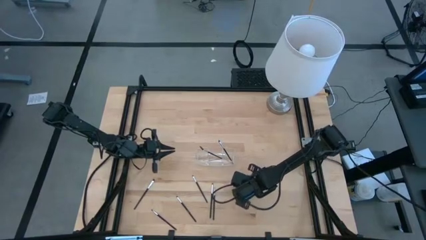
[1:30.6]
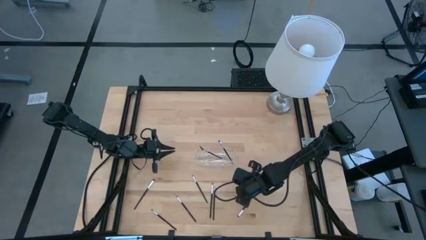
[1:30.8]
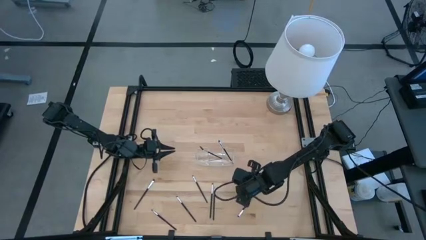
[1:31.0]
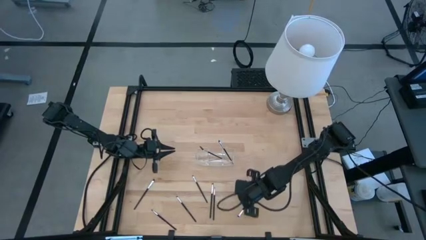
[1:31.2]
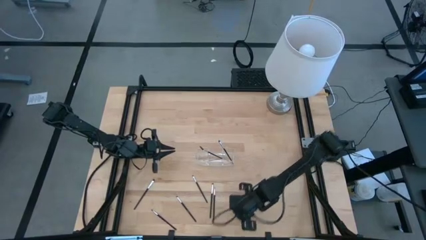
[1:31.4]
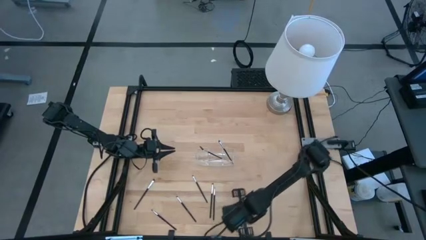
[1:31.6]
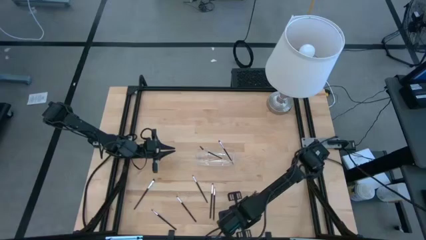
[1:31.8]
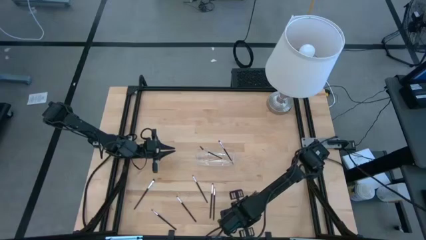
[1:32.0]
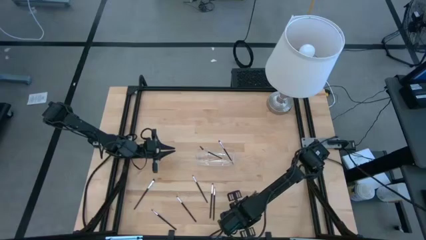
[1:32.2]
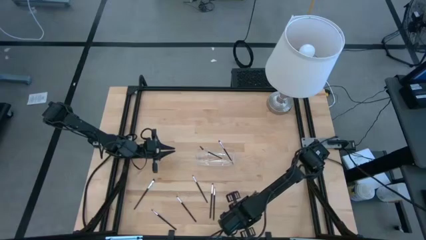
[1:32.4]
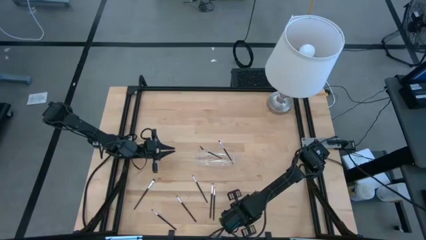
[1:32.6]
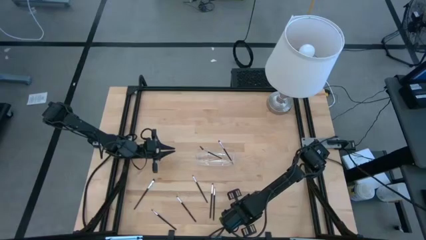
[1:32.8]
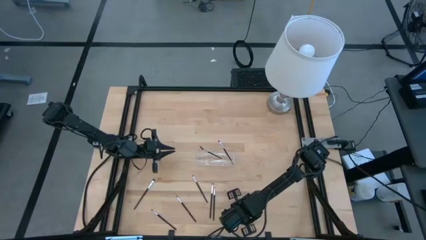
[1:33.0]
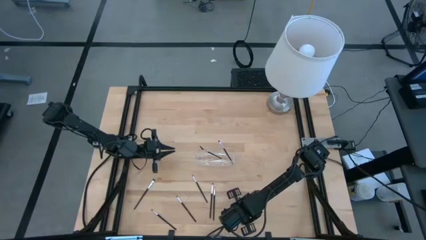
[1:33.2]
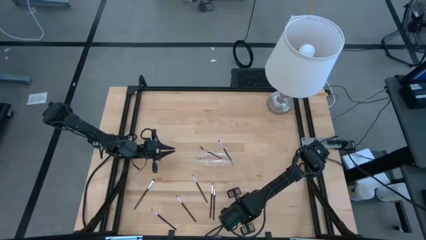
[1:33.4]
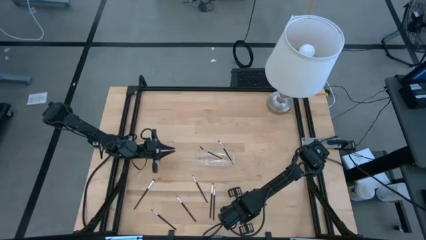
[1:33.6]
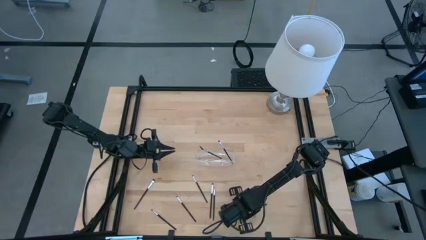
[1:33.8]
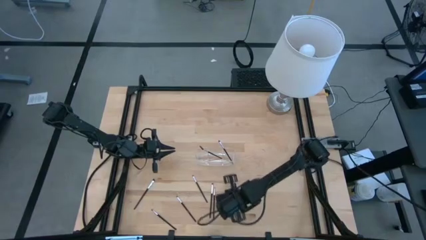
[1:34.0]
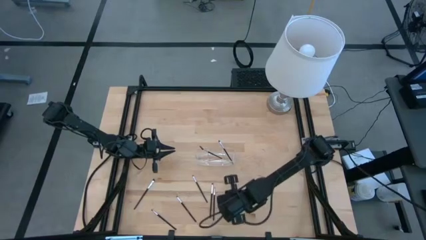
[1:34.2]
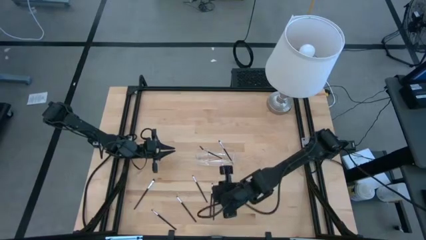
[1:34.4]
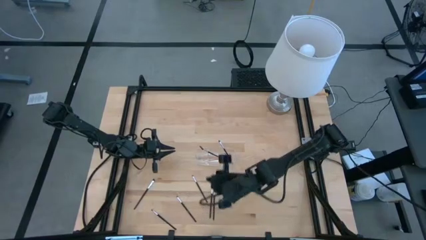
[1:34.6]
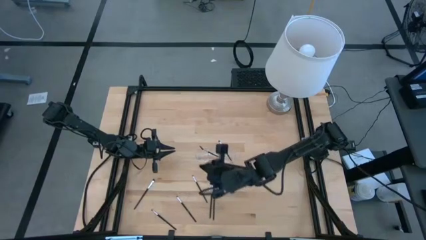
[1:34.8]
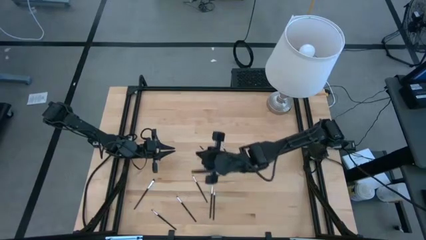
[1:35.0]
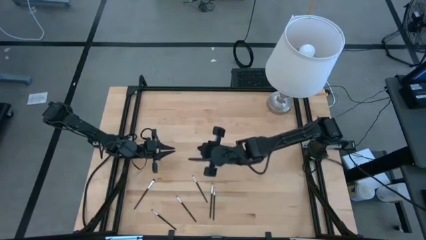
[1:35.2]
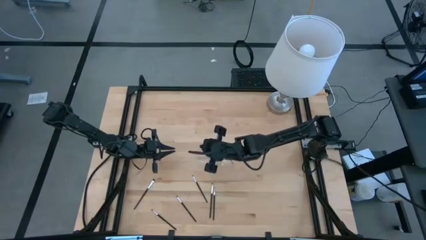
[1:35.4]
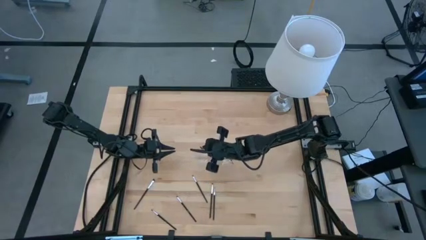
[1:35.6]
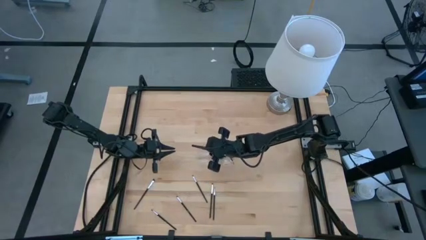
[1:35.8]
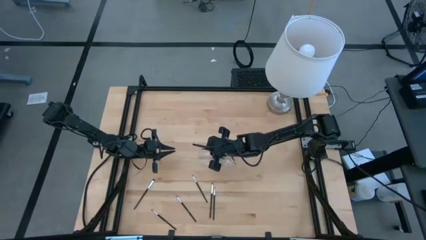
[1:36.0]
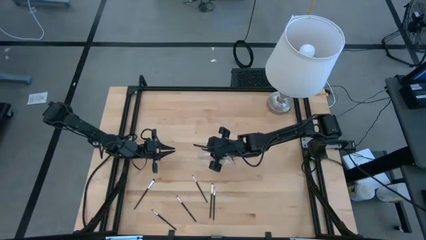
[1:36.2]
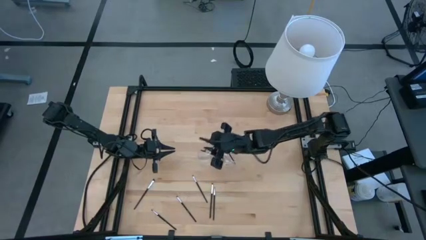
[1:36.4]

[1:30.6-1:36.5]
Task: Pick & Place Makeup Supplies
Put the makeup brush into the transparent organizer

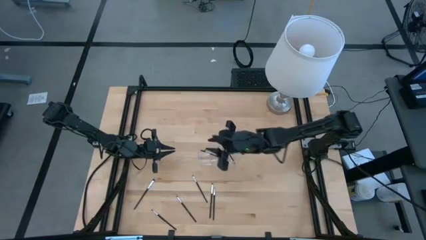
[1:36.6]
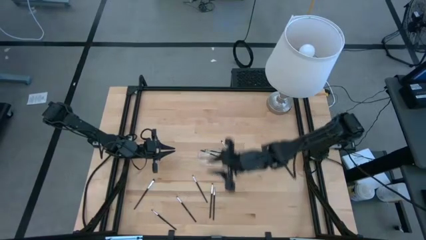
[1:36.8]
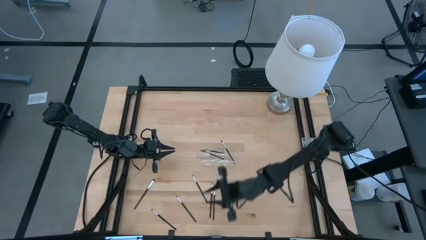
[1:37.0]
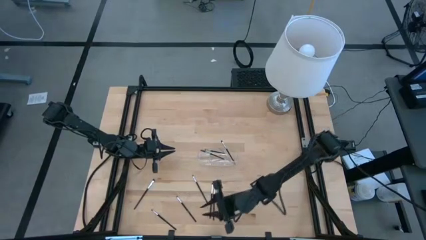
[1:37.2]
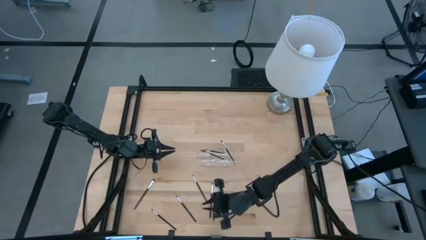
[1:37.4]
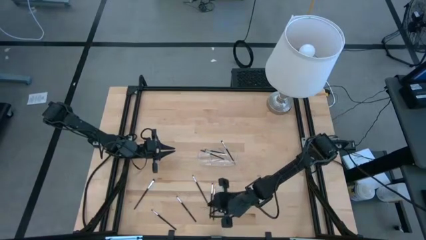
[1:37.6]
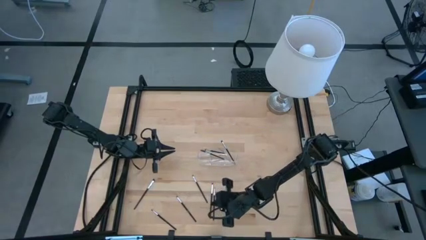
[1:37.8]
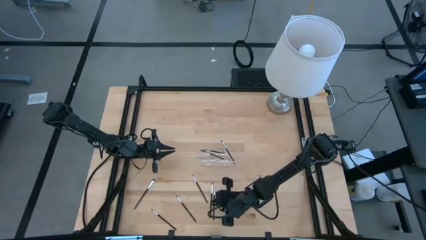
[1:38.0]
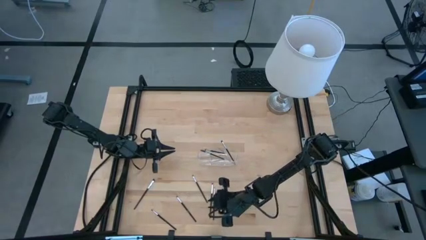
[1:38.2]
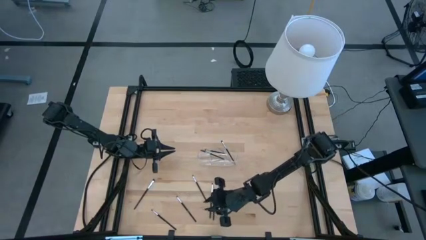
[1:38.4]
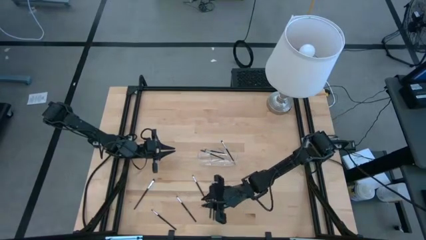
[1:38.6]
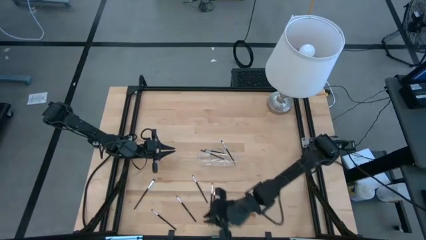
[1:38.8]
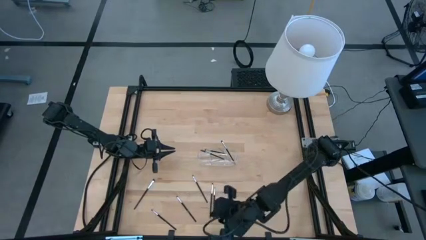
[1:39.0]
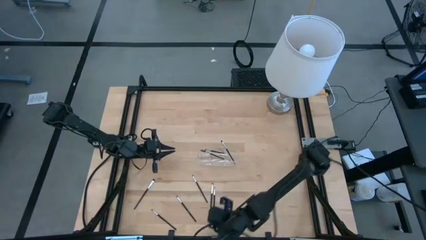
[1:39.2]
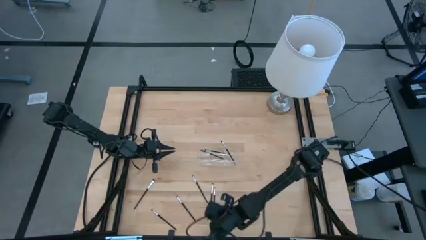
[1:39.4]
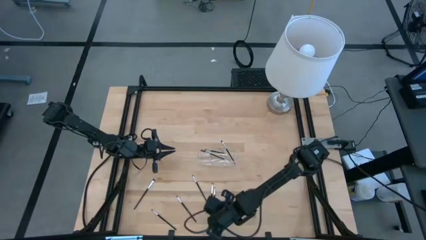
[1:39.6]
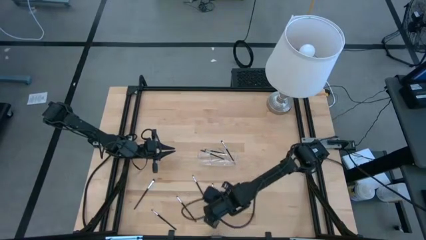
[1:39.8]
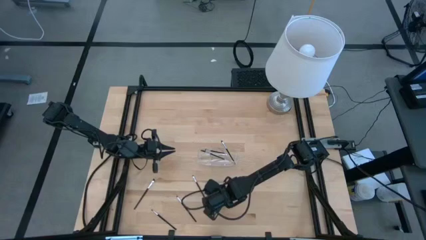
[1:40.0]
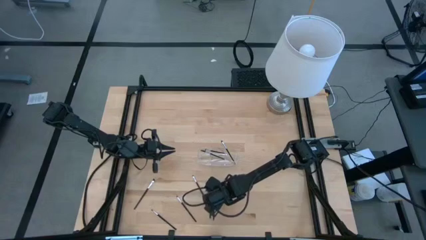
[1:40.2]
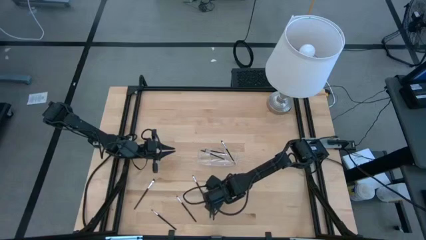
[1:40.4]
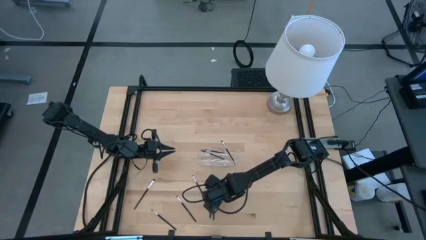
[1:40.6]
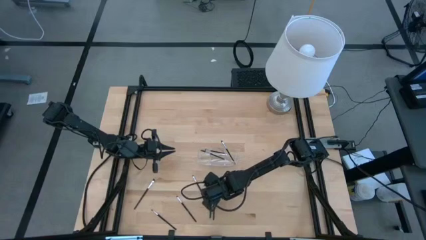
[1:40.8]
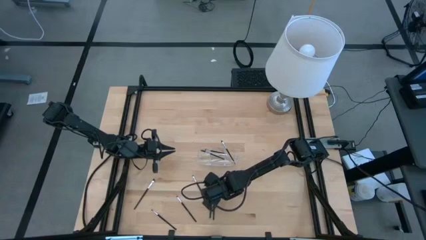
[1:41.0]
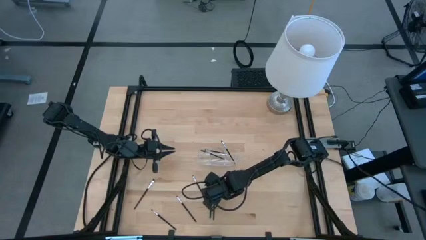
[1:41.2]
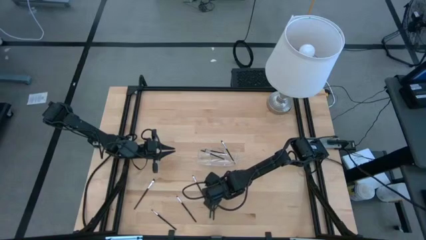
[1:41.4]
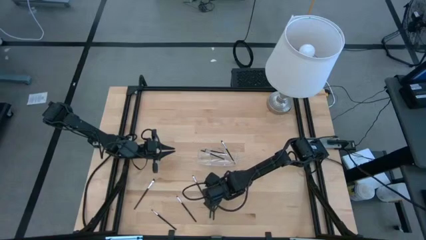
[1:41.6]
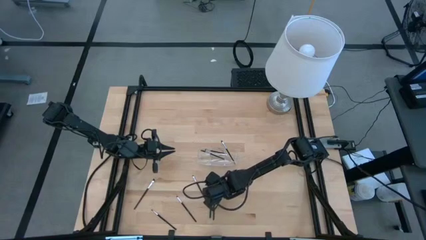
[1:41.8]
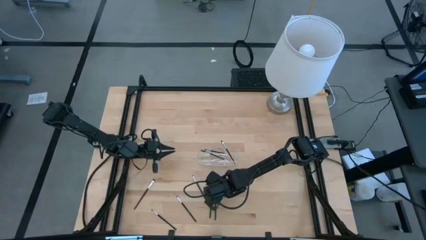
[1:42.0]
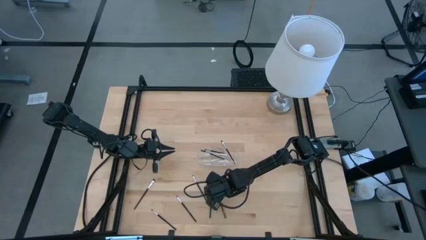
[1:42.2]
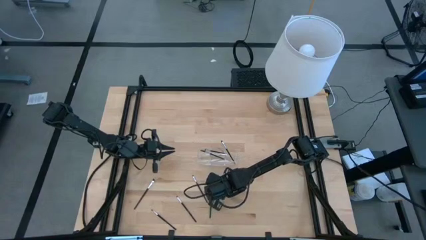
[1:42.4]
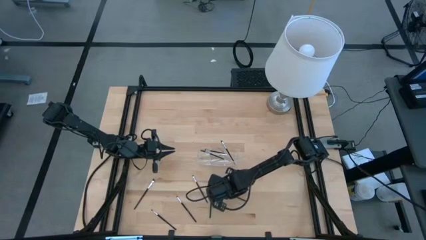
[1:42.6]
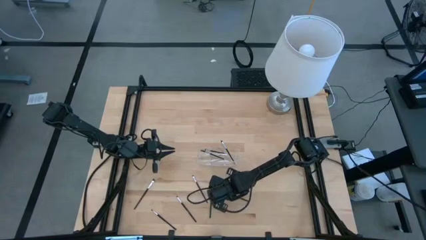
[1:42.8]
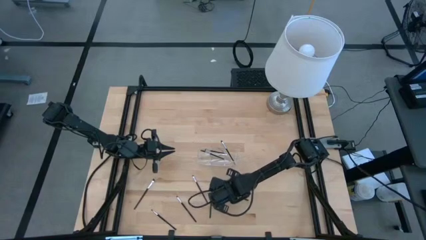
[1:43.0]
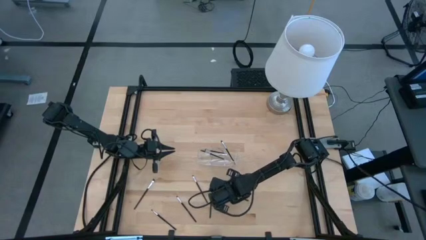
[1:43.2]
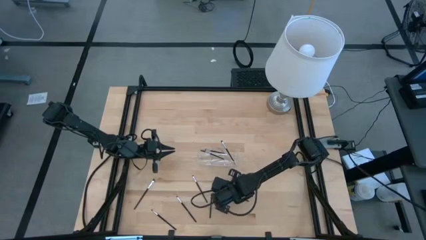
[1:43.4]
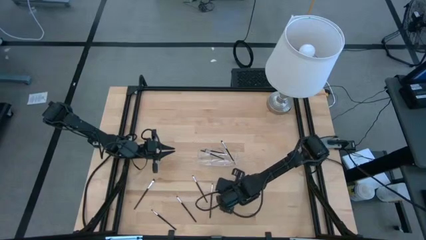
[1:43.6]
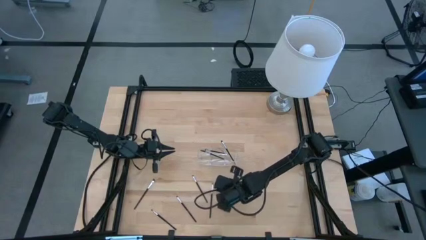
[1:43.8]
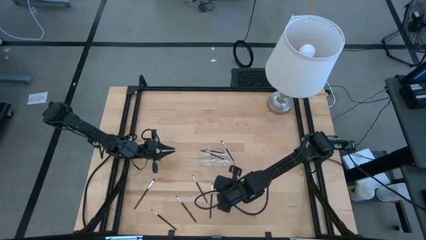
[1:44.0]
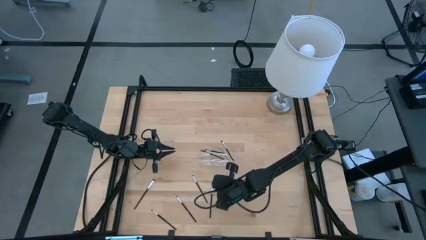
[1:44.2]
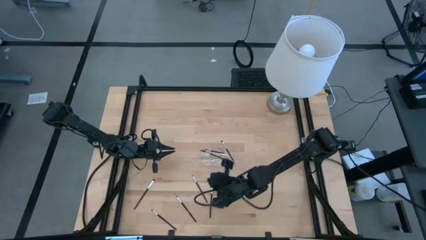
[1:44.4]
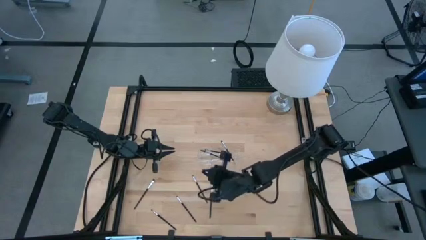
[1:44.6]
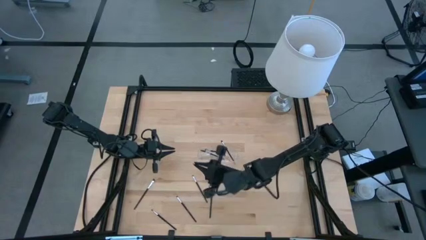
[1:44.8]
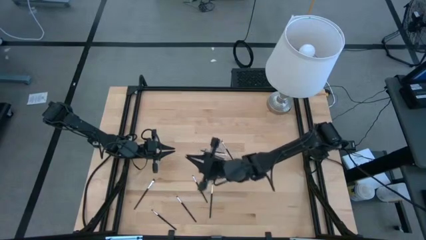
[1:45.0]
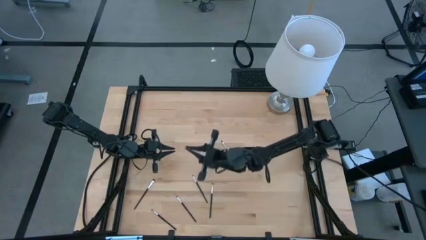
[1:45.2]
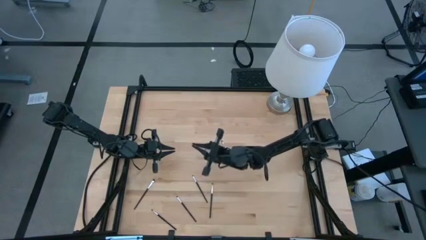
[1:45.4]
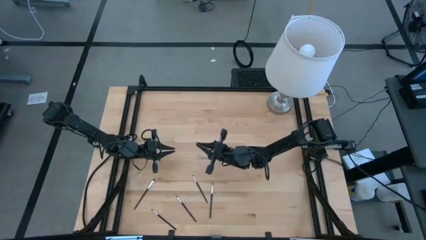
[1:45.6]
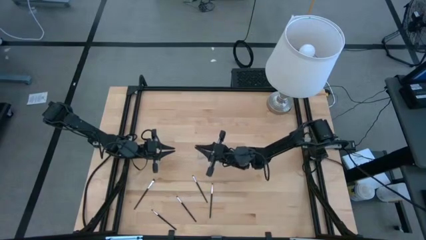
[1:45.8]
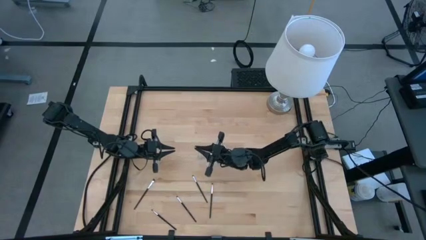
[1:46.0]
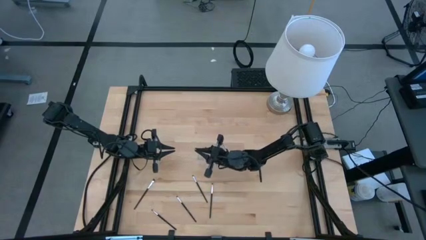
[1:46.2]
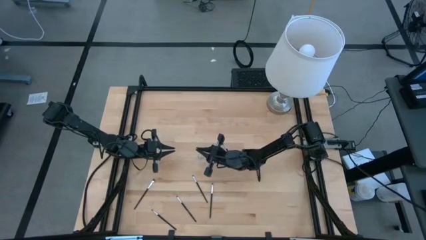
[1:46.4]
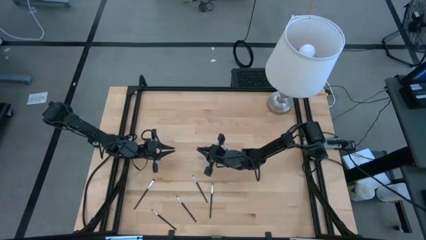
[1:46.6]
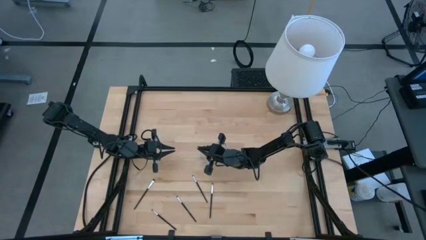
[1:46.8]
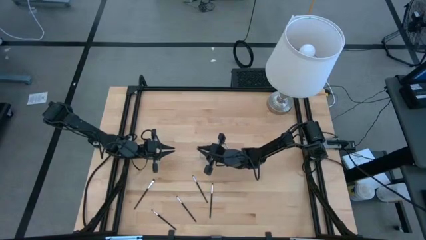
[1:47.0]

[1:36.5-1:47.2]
Put the makeup brush into the transparent organizer
